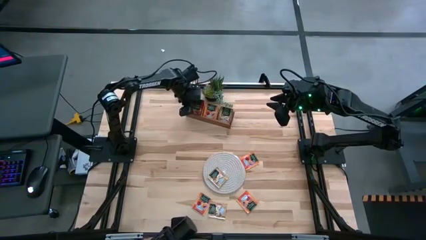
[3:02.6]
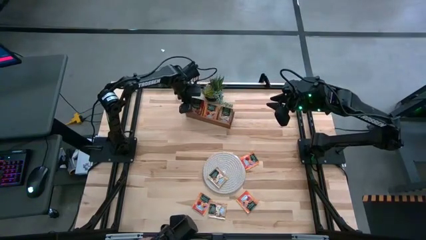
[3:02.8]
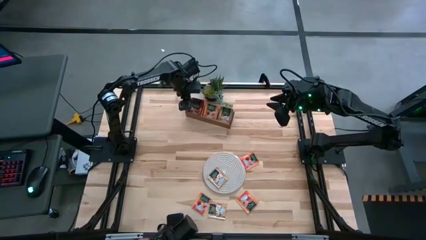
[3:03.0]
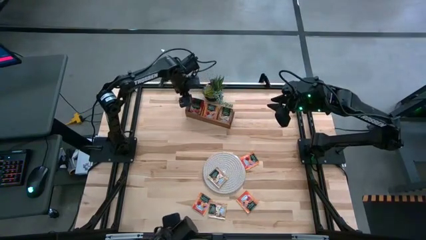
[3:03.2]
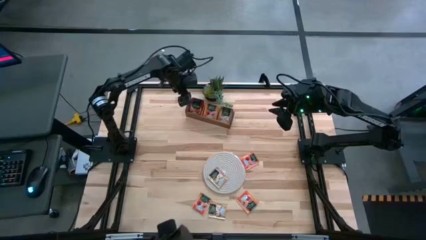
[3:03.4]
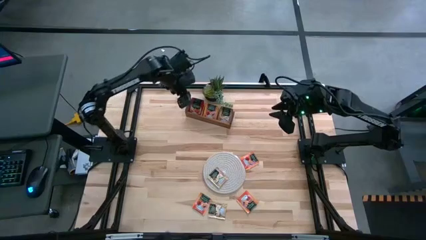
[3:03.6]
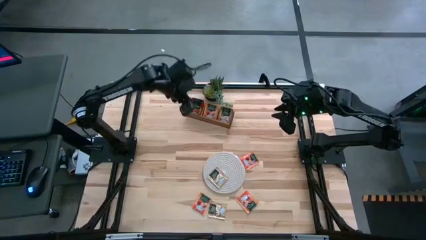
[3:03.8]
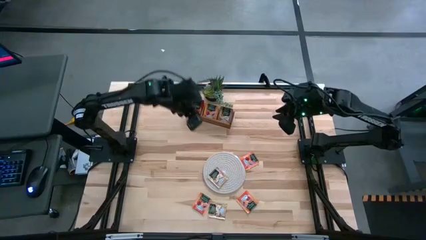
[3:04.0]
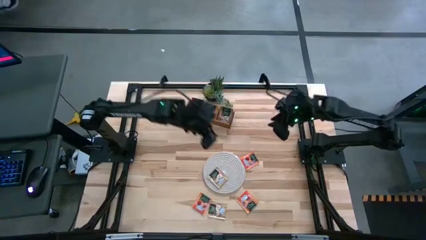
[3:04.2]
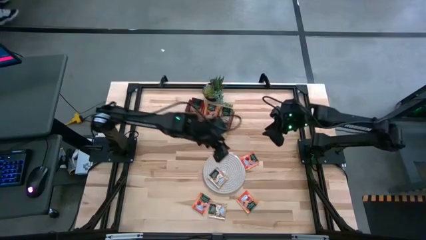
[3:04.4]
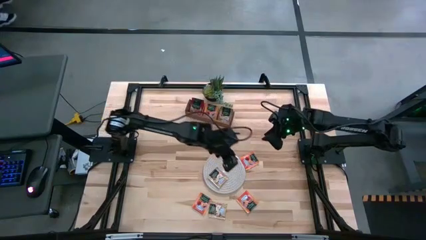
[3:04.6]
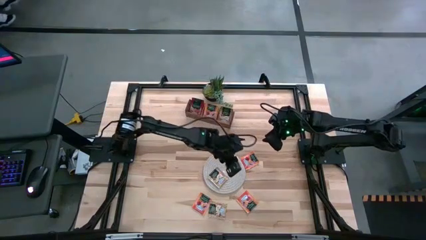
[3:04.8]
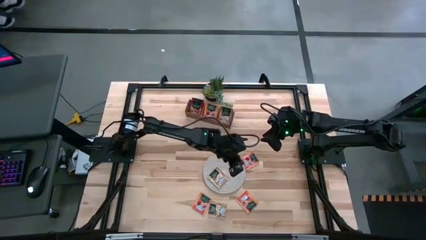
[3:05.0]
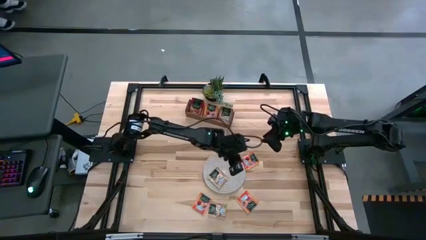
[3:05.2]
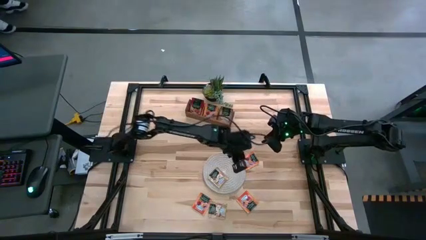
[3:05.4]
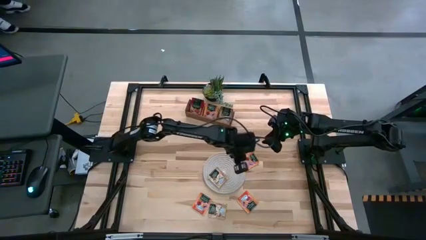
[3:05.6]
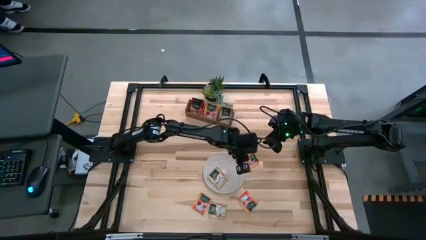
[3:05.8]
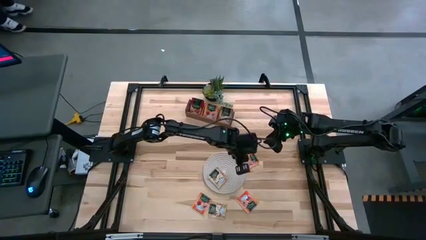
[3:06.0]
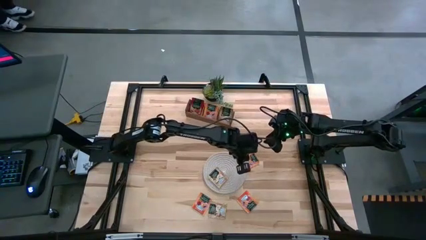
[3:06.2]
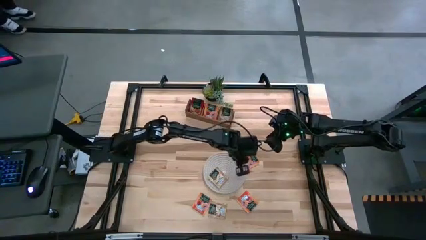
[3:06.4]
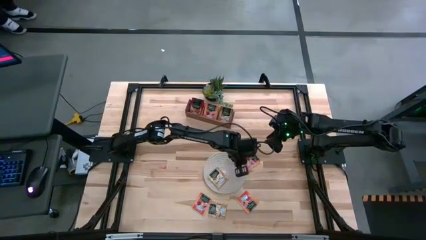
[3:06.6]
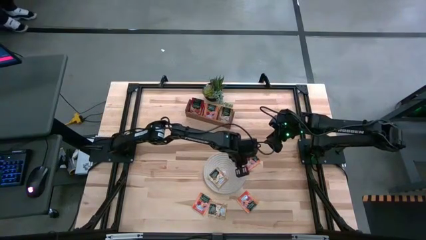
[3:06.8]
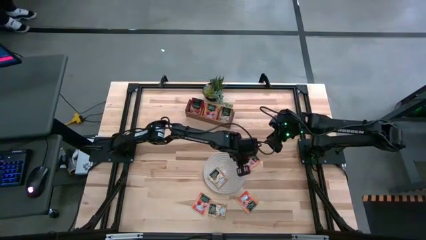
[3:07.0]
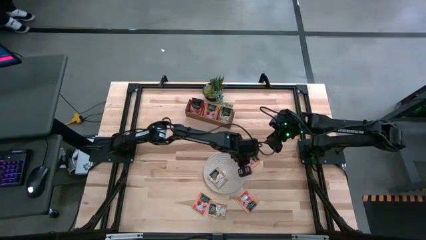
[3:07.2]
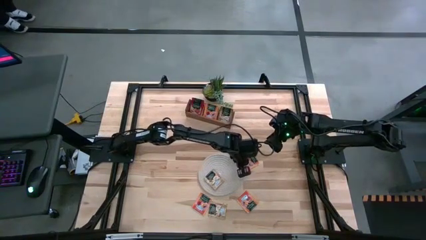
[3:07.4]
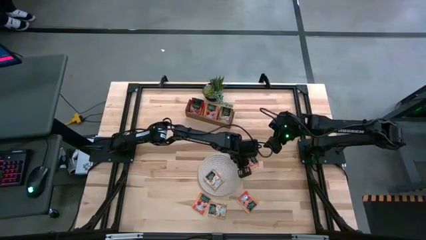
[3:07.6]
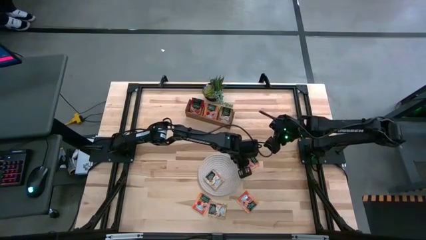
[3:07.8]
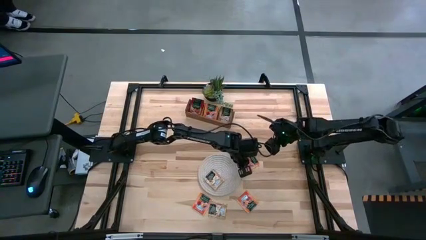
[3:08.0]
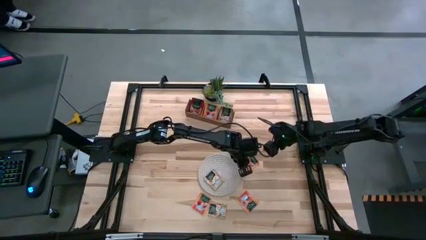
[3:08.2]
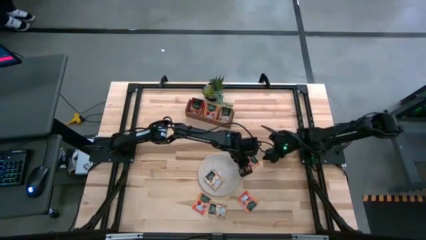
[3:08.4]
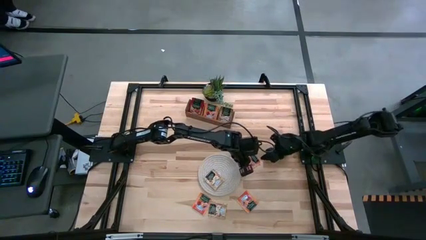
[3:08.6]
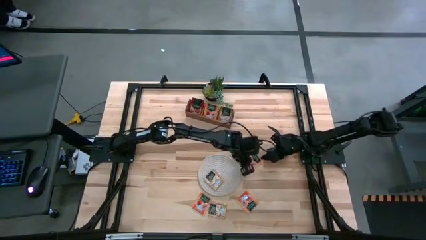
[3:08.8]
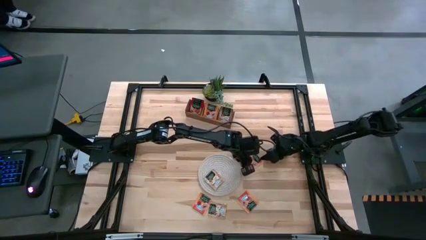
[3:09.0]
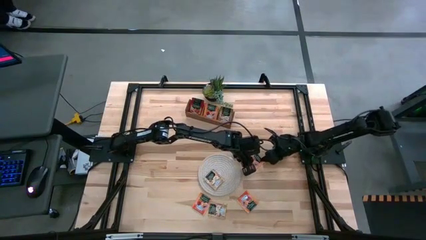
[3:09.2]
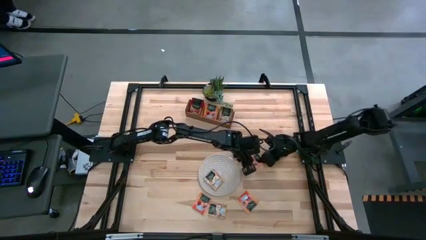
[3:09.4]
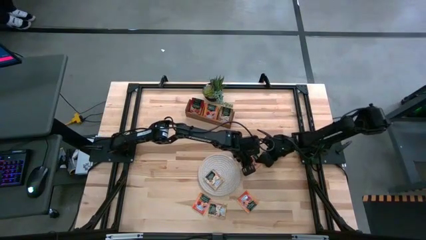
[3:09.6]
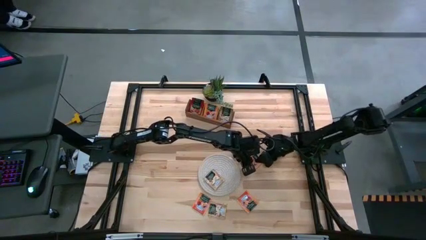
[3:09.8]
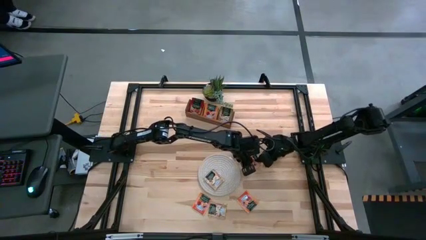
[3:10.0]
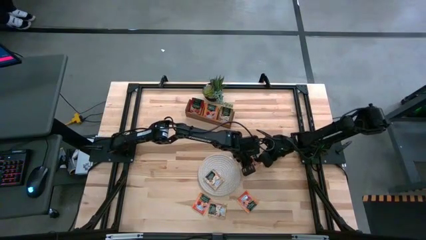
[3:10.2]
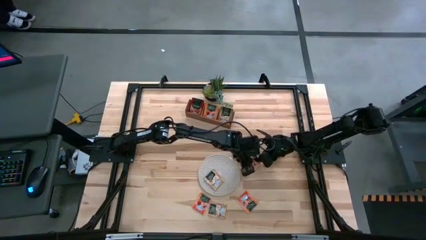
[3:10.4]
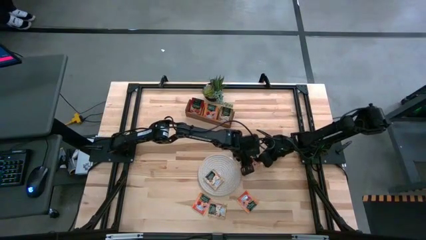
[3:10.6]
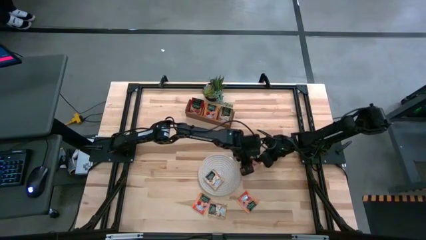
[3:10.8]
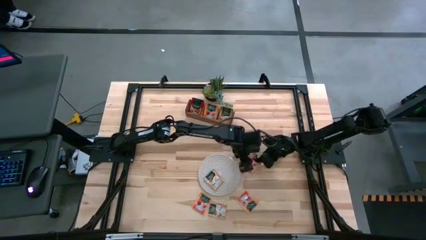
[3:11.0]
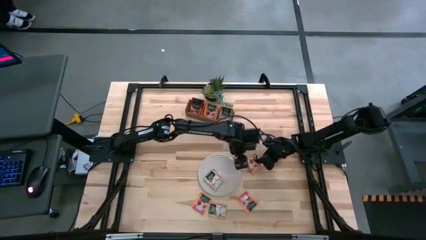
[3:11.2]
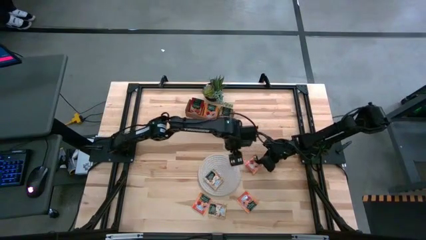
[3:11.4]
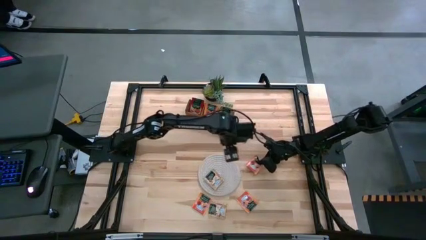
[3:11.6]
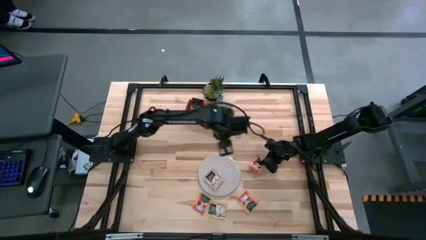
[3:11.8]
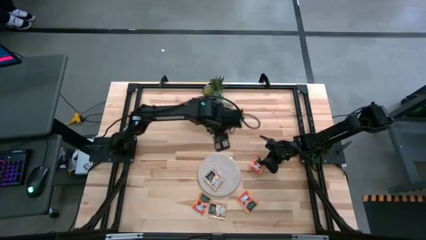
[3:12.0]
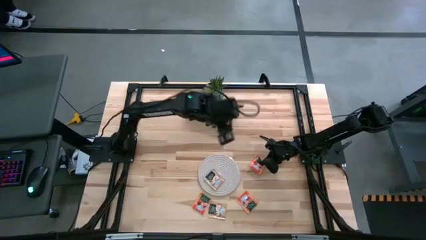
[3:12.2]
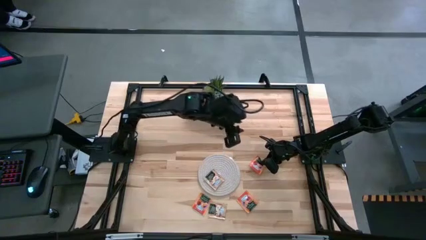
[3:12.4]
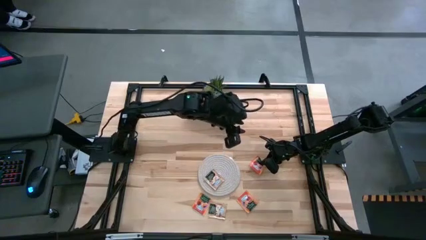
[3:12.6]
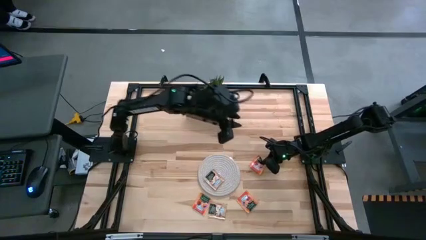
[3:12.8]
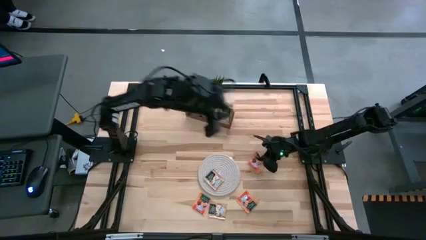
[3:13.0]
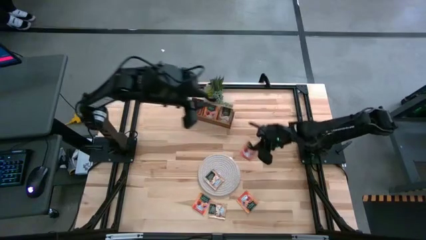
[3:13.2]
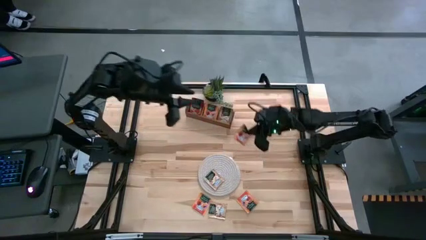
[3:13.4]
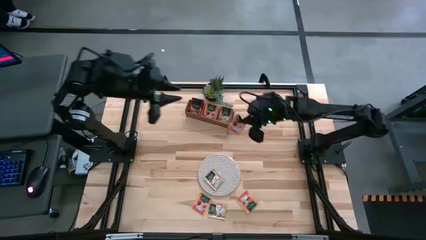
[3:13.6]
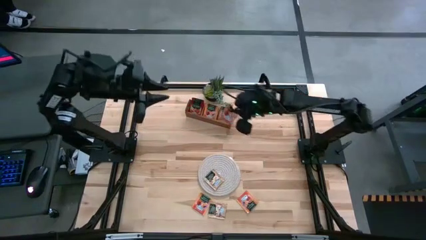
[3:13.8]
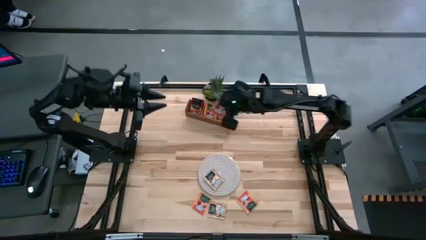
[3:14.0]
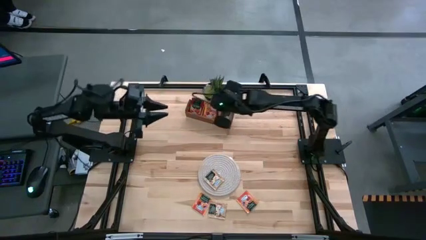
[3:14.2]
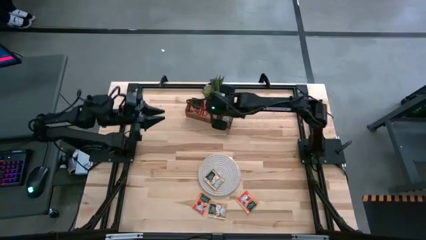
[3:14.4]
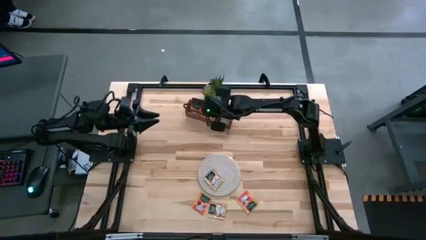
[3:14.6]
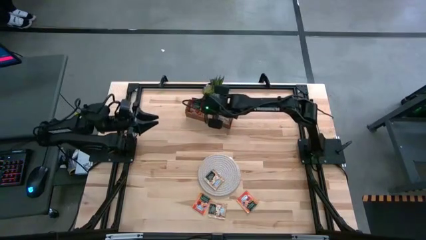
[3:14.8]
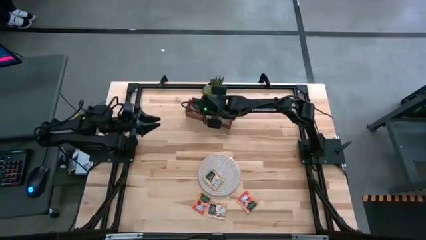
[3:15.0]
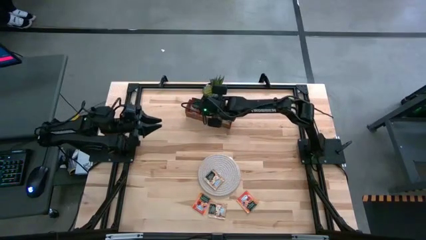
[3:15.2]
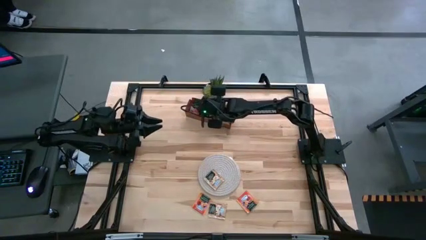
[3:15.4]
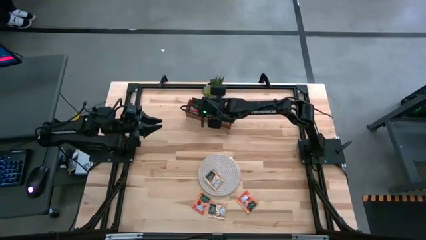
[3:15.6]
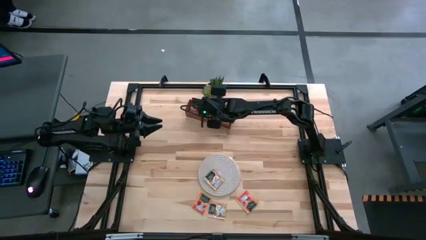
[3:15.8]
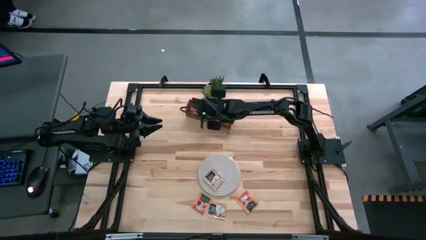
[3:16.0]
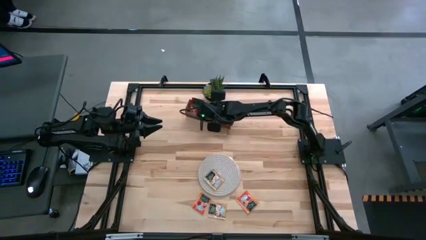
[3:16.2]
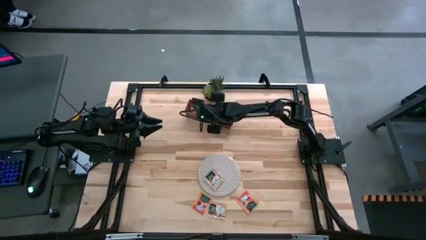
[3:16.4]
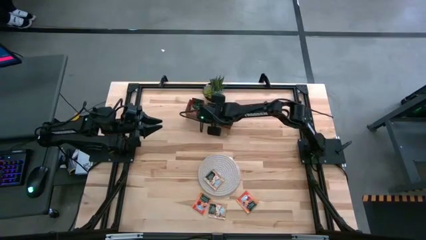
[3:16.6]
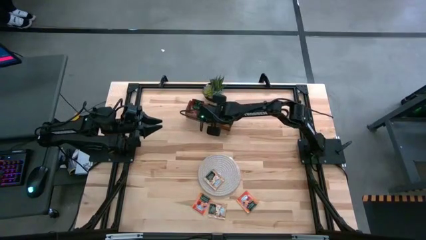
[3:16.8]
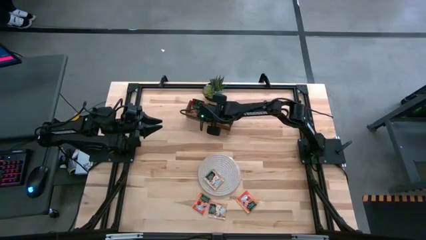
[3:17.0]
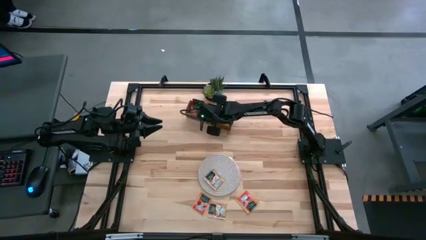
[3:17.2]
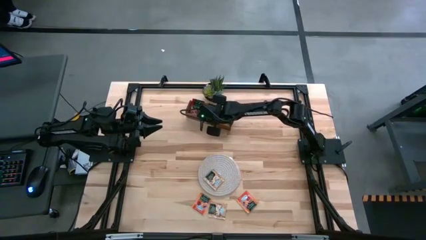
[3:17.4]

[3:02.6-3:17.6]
Task: Pick & Place Tea
Put the orange tea bag into the middle section of the wooden organizer
